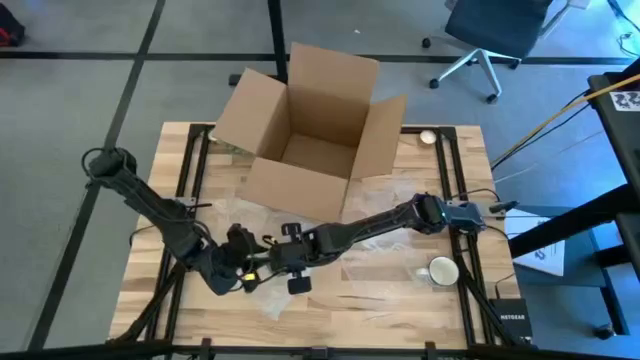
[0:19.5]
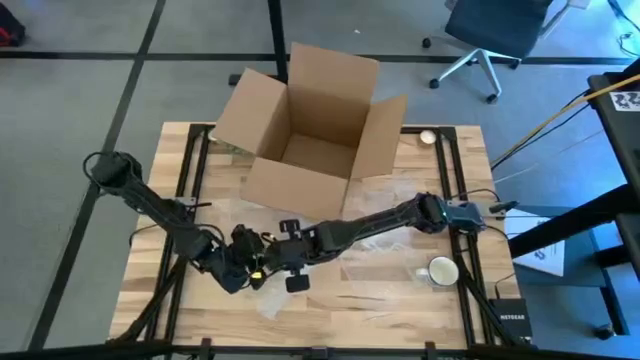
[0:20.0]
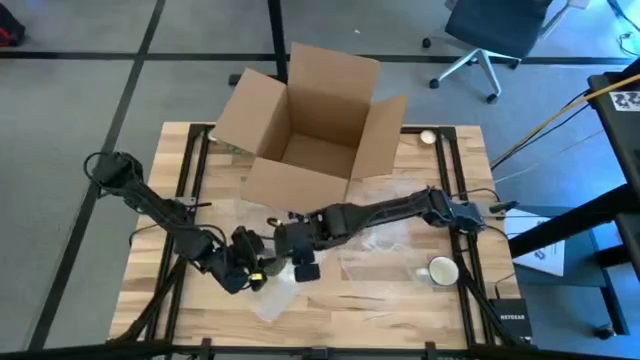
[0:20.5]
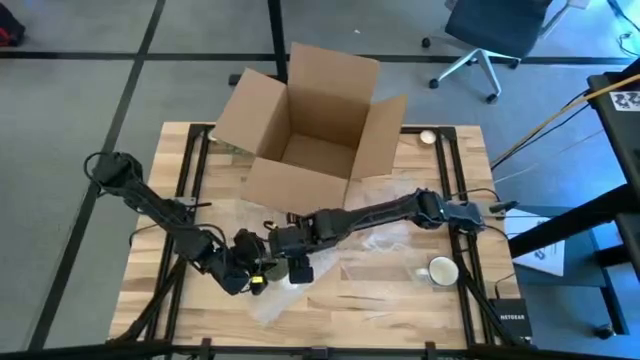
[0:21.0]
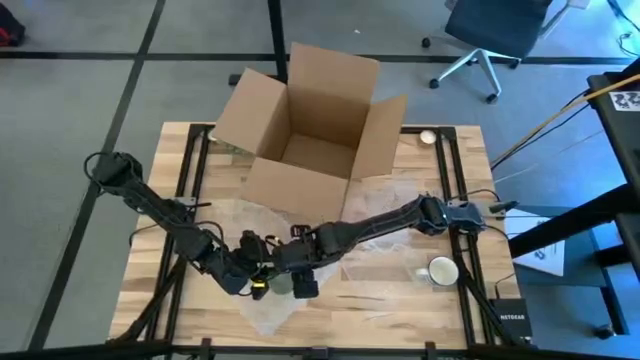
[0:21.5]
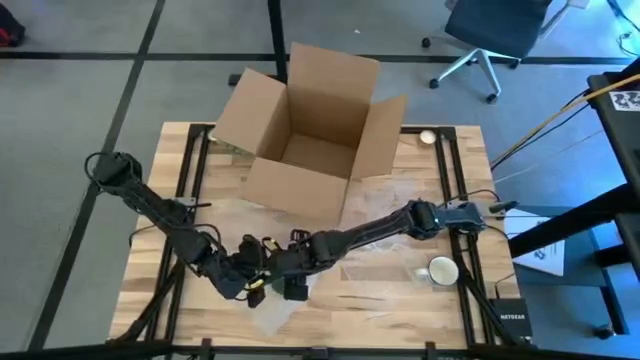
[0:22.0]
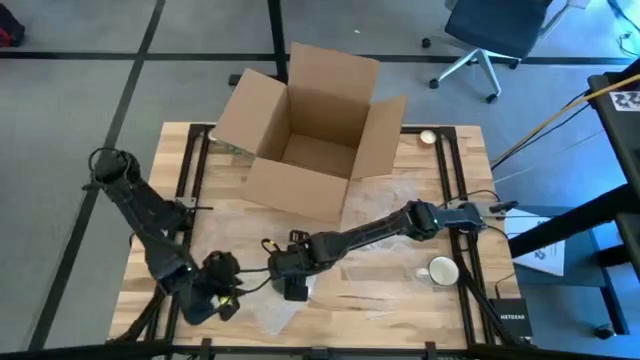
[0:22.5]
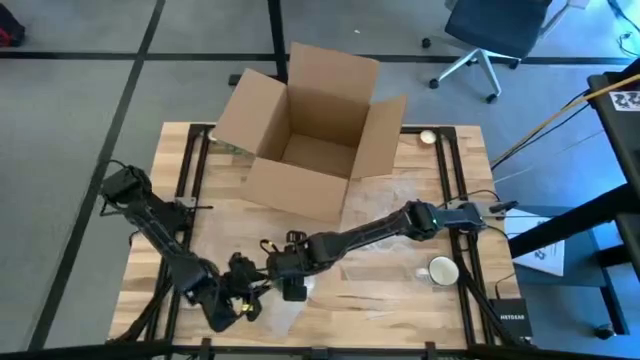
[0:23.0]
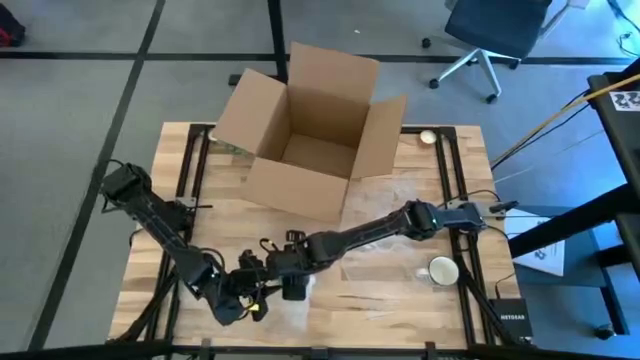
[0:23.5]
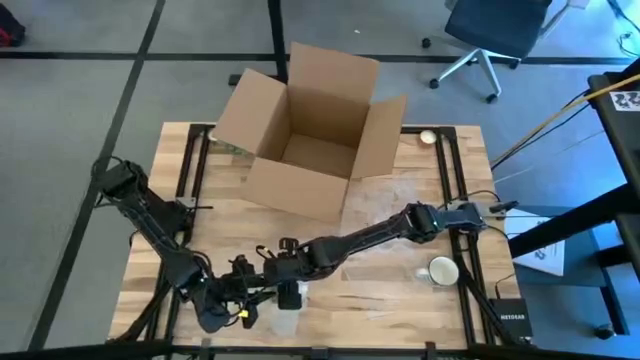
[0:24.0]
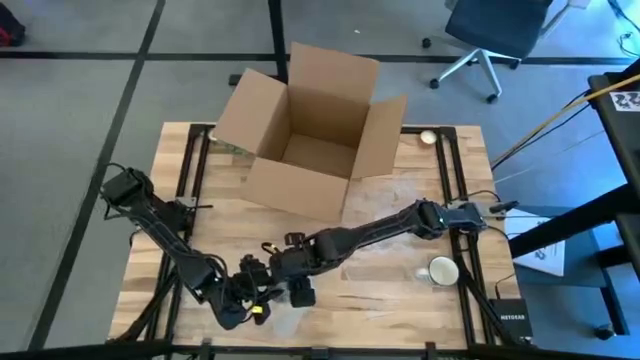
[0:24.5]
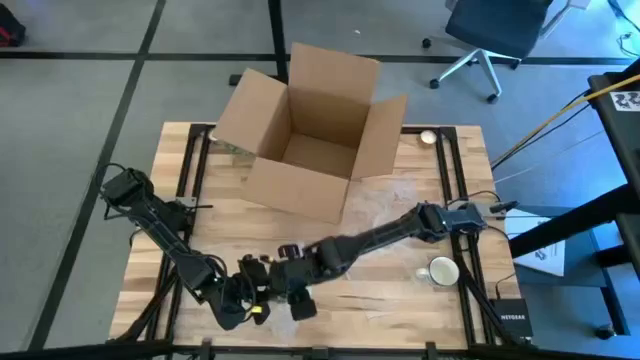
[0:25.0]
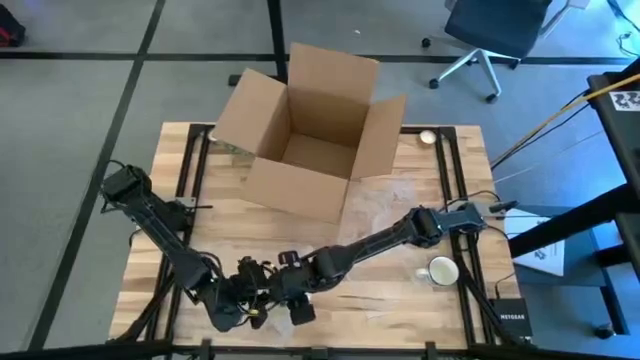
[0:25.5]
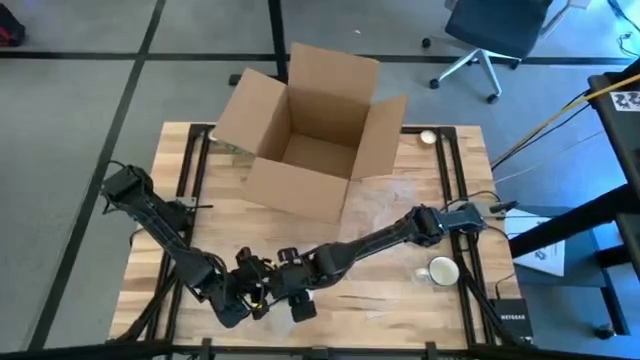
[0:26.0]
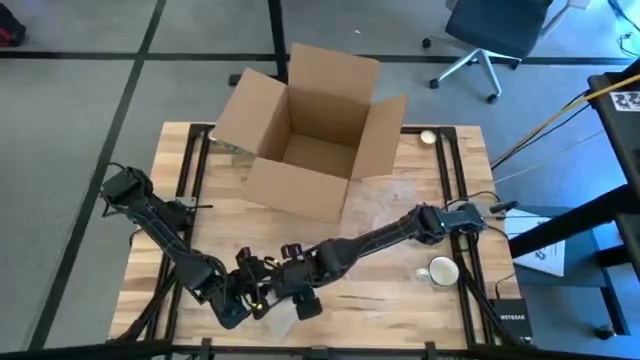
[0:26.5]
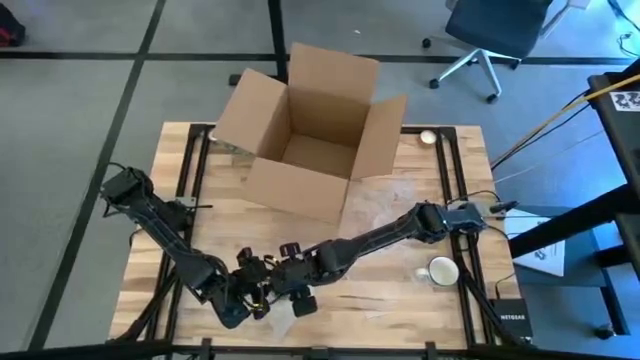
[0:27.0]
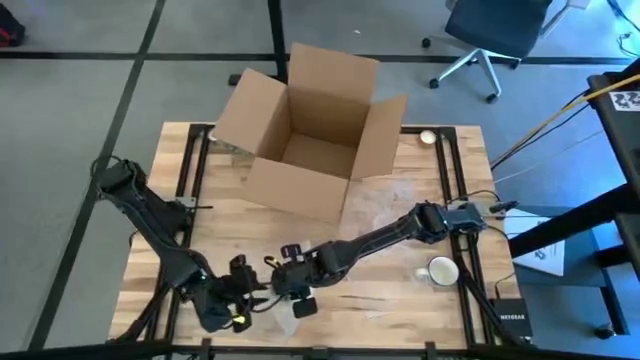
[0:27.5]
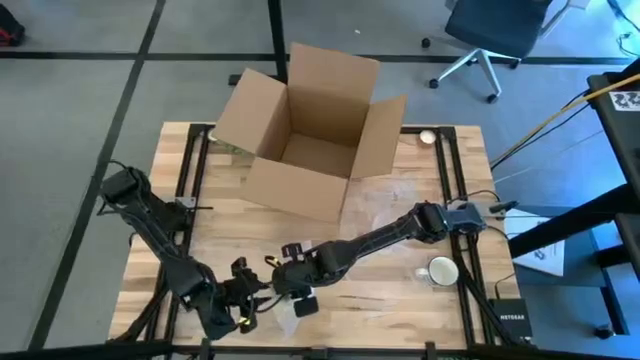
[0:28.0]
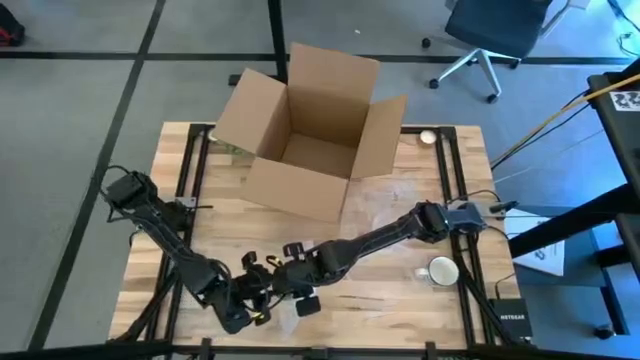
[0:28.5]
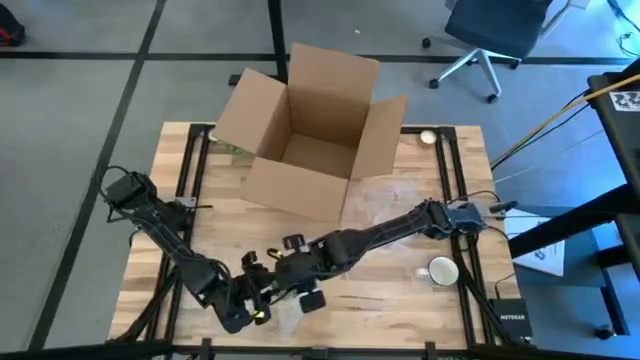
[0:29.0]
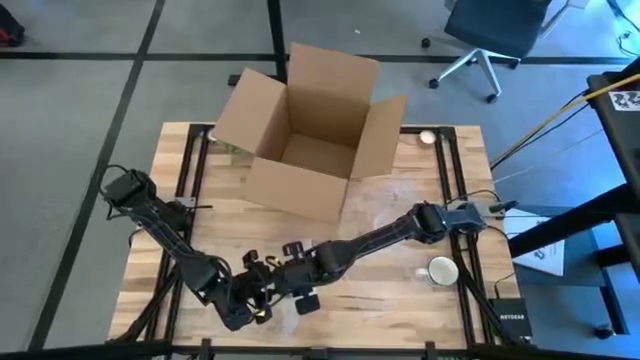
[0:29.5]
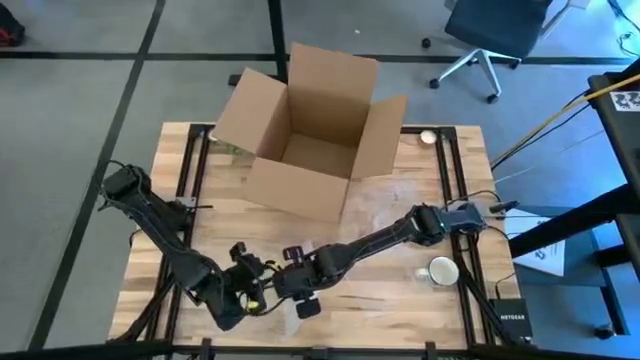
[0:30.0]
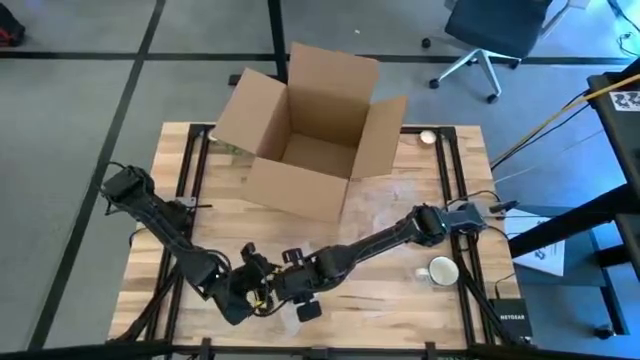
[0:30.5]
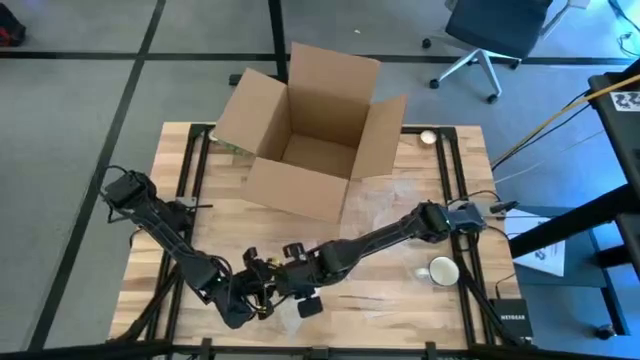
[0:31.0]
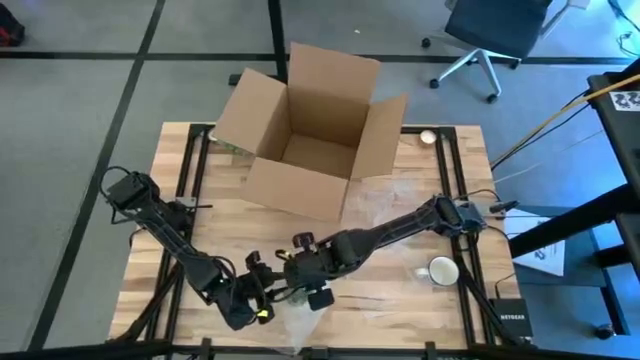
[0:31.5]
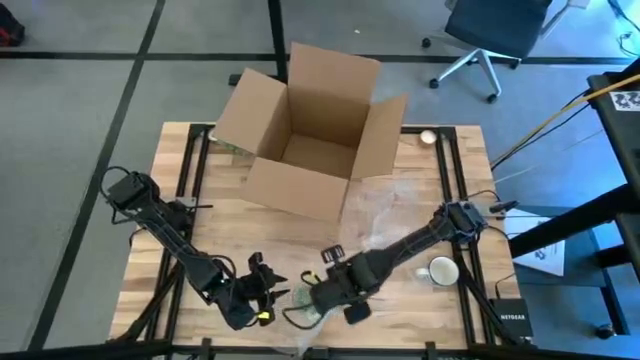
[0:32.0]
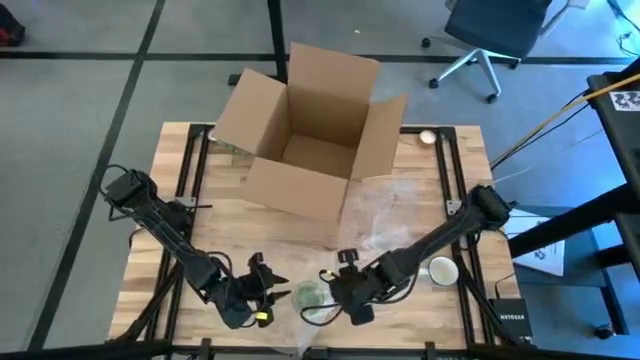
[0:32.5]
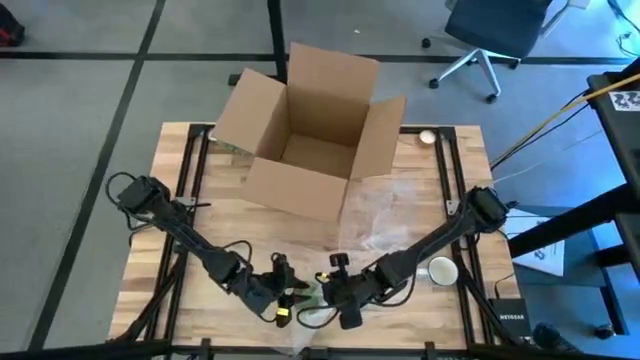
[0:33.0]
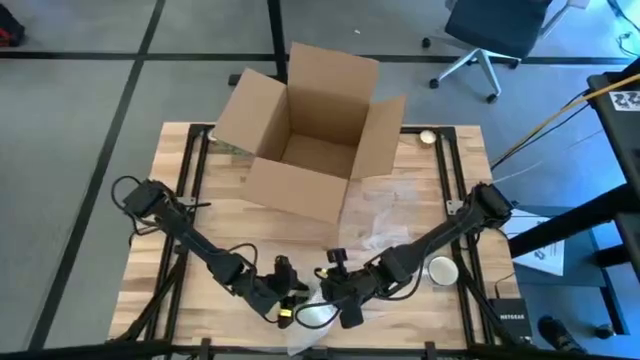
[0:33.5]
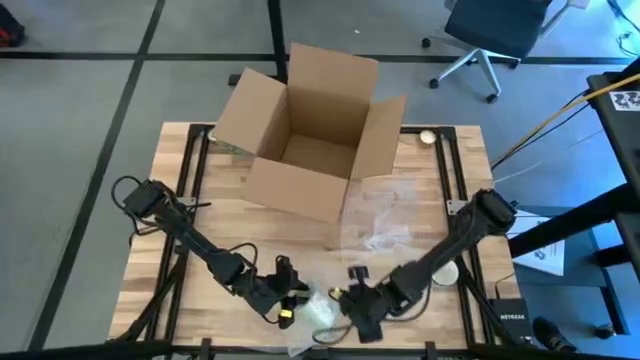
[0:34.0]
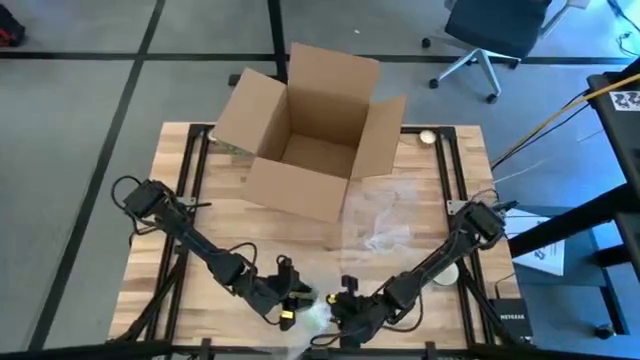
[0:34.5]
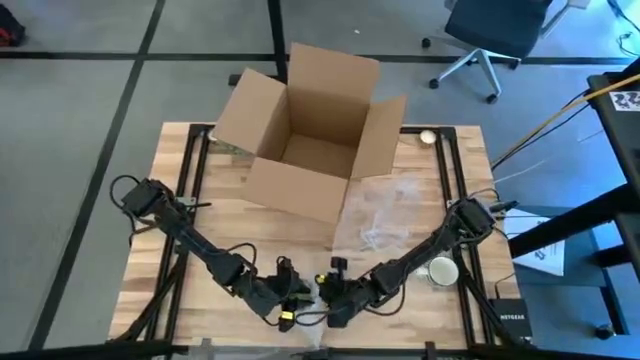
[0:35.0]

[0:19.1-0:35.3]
Task: wrap mug
Wrap the green mug with bubble wrap

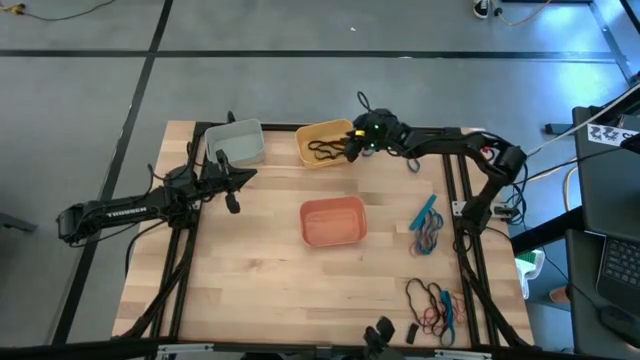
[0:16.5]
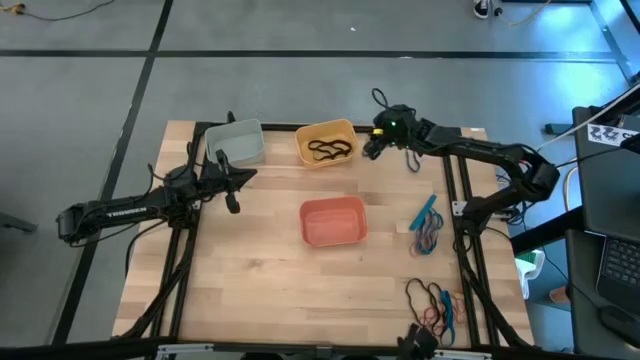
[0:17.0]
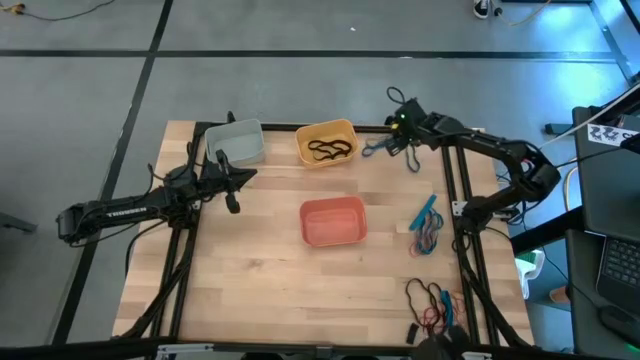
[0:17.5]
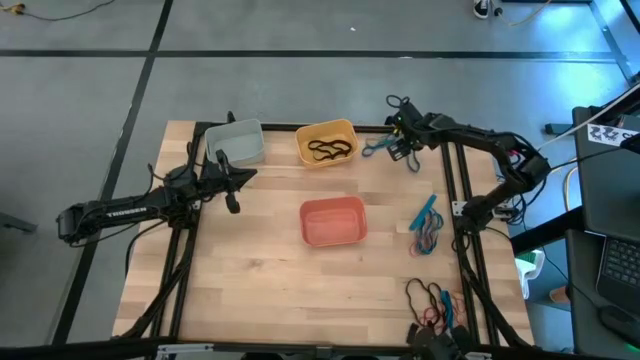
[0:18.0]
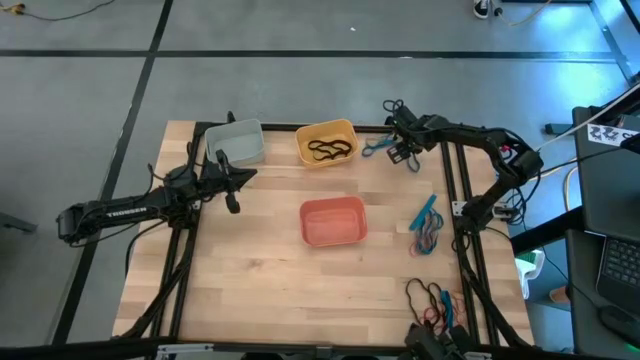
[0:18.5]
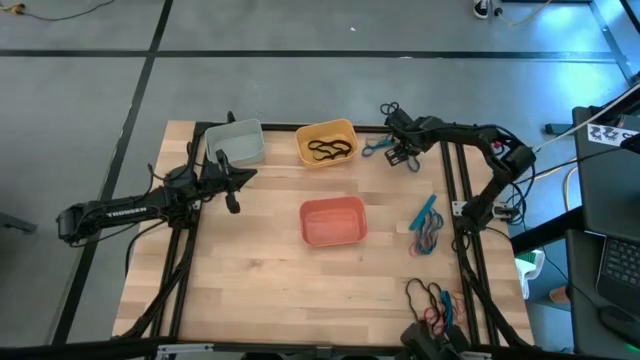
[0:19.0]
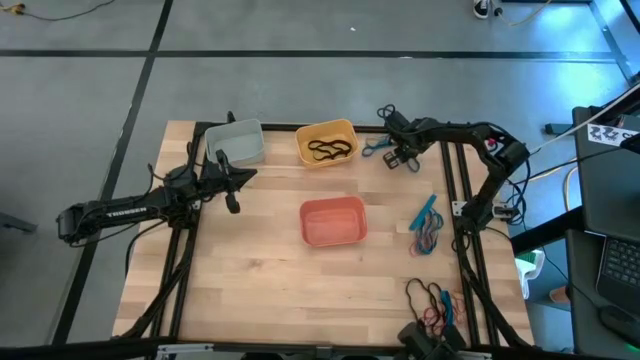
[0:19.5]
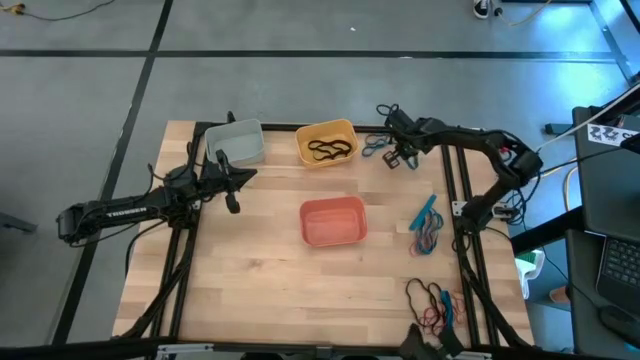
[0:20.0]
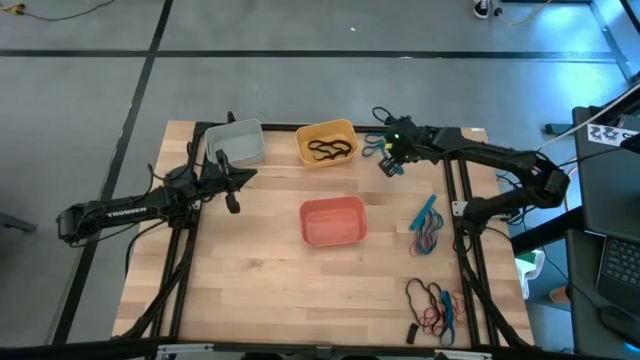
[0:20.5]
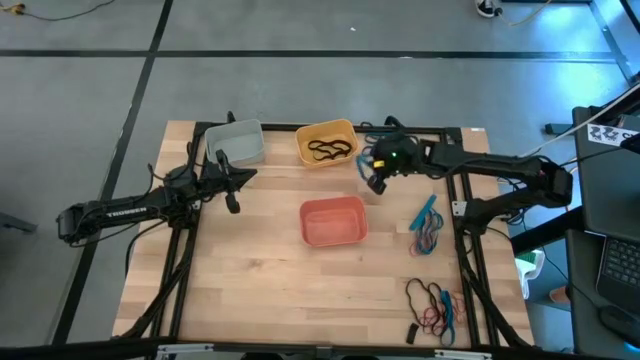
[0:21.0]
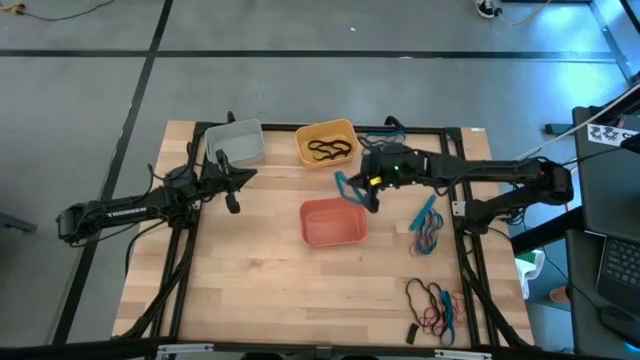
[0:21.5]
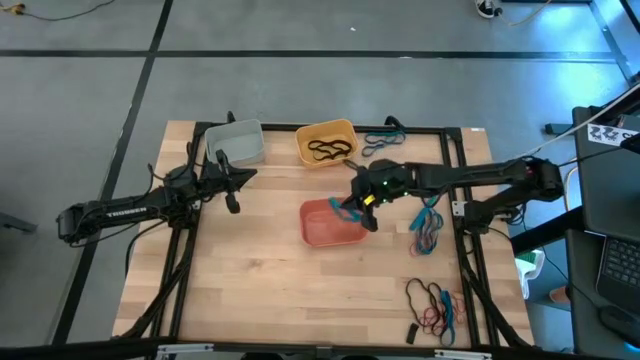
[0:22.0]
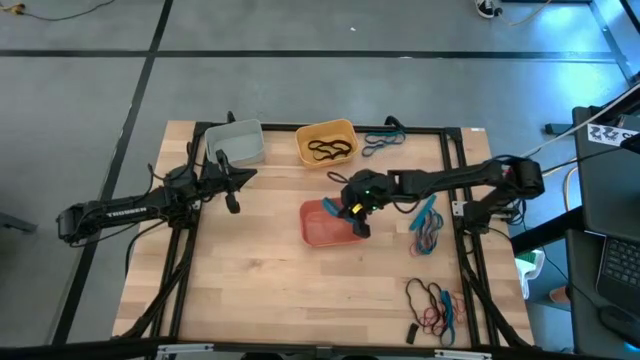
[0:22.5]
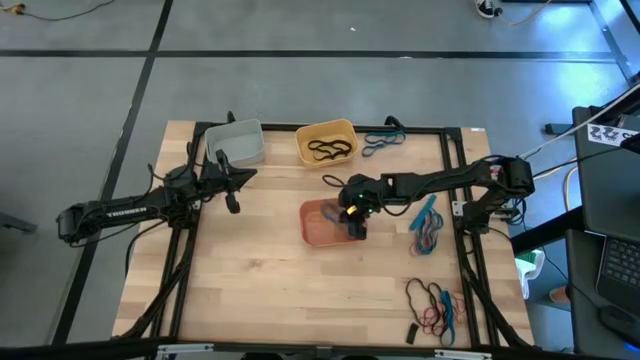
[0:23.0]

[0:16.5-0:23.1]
Task: Sort rubber bands into baskets
Put the blue rubber band into the orange bin
